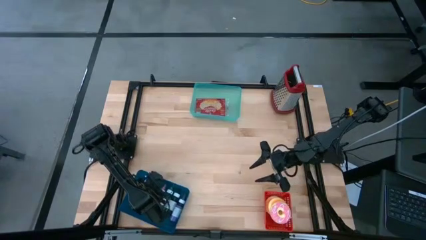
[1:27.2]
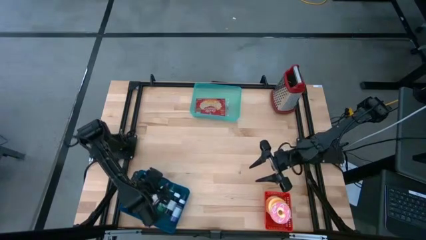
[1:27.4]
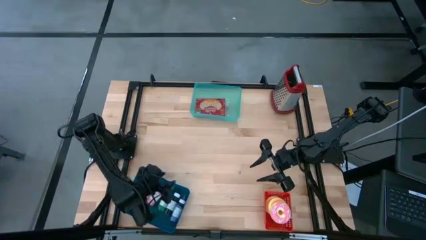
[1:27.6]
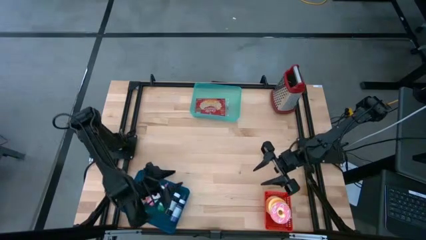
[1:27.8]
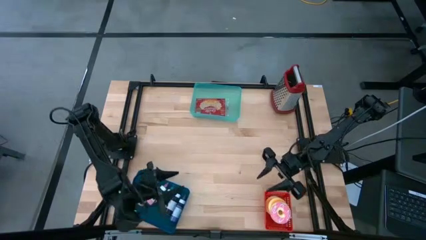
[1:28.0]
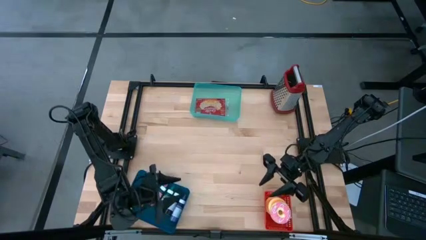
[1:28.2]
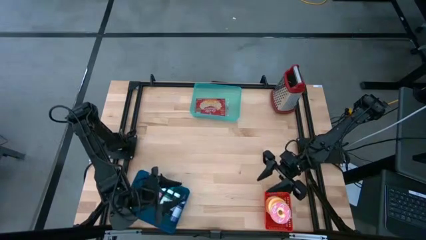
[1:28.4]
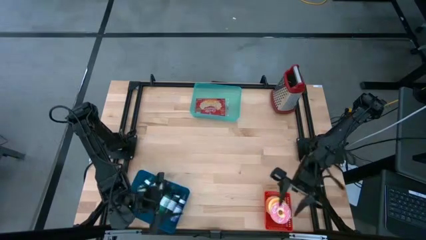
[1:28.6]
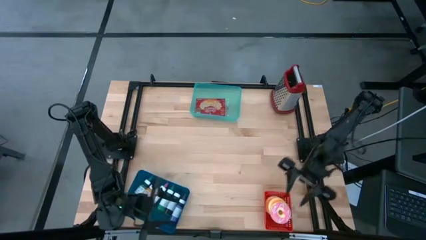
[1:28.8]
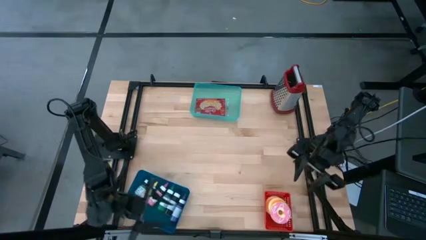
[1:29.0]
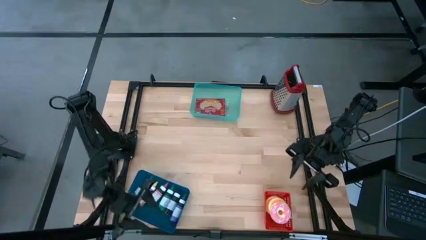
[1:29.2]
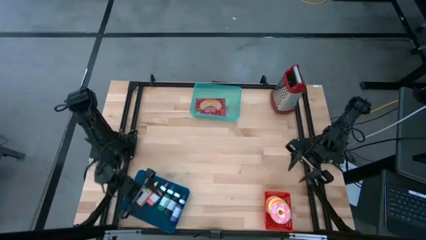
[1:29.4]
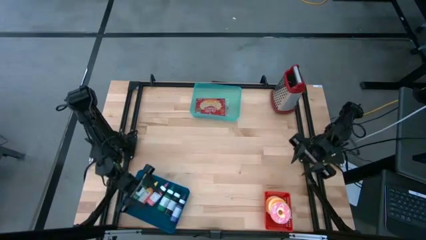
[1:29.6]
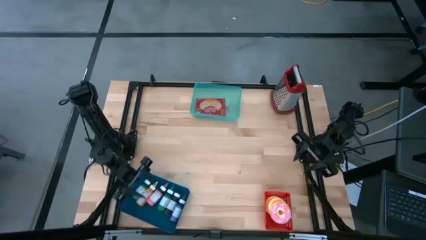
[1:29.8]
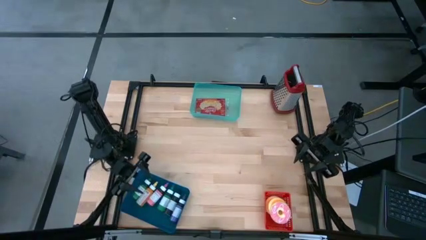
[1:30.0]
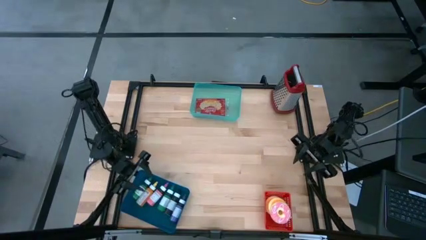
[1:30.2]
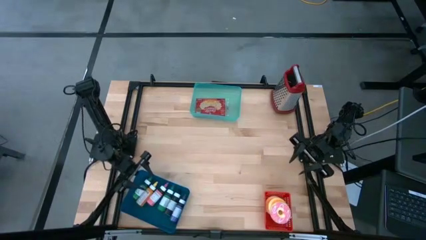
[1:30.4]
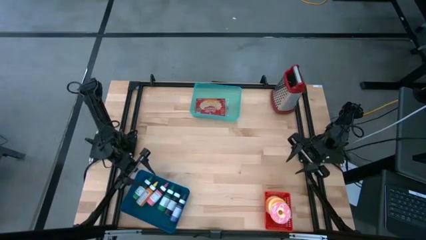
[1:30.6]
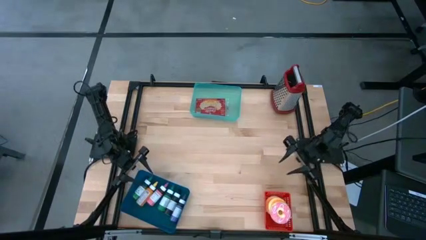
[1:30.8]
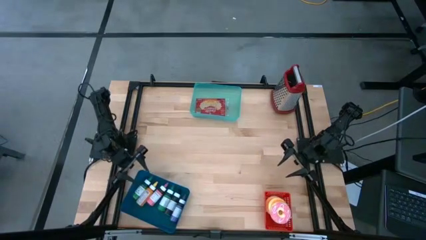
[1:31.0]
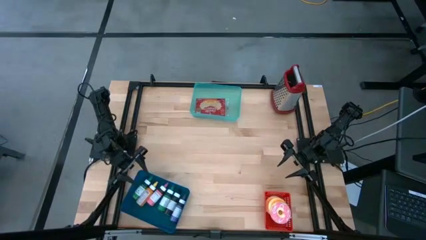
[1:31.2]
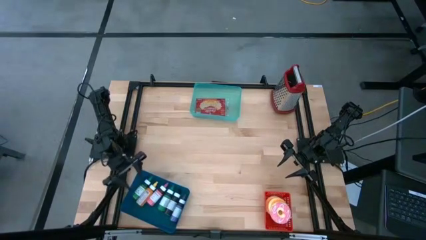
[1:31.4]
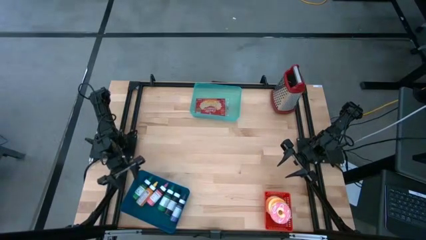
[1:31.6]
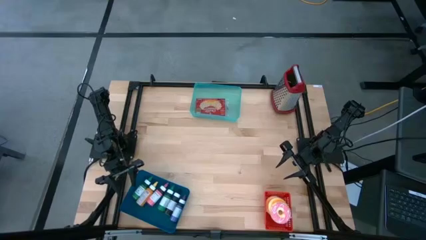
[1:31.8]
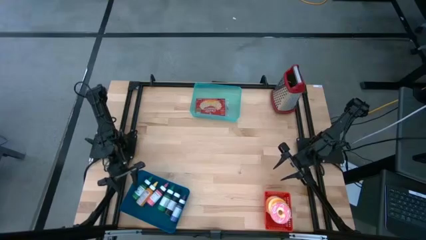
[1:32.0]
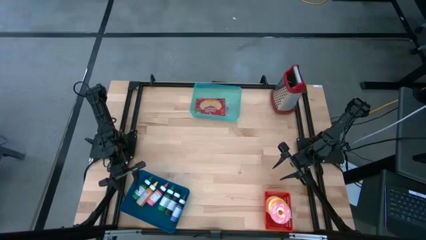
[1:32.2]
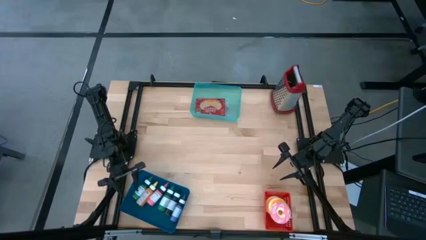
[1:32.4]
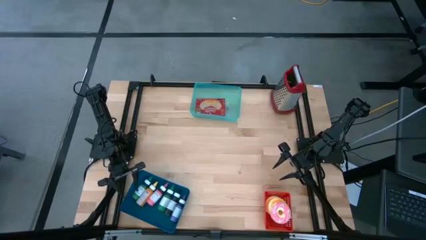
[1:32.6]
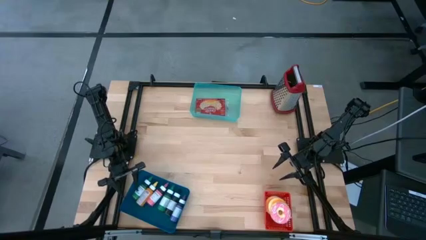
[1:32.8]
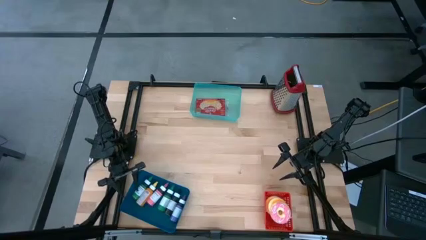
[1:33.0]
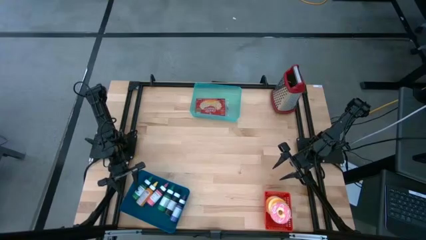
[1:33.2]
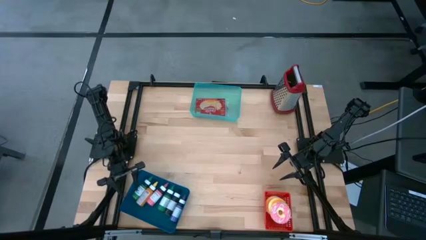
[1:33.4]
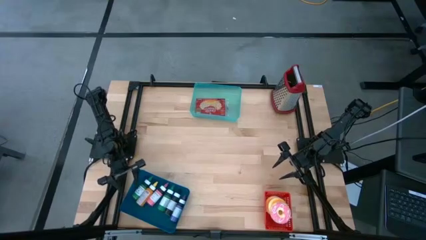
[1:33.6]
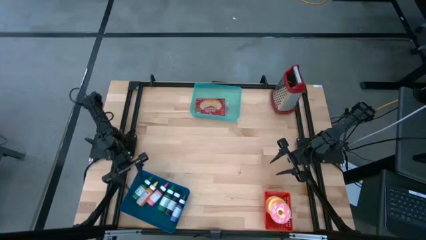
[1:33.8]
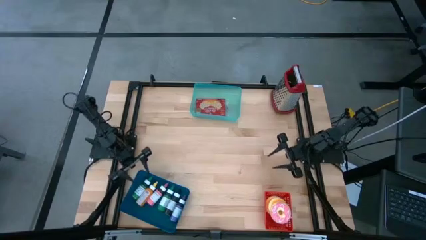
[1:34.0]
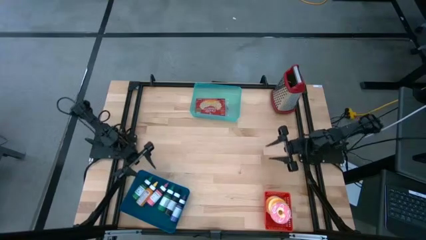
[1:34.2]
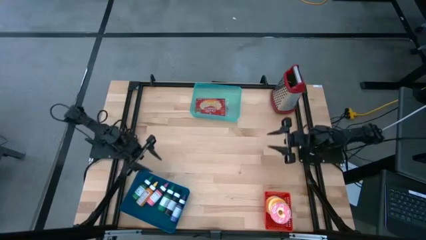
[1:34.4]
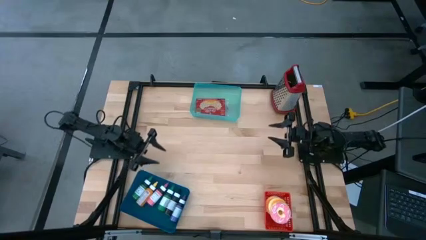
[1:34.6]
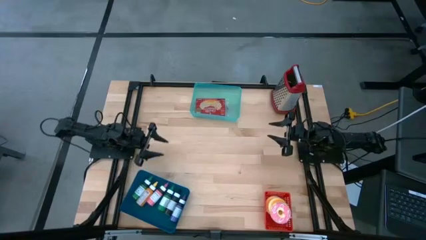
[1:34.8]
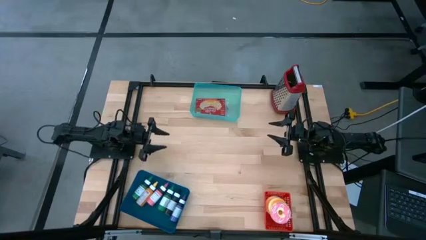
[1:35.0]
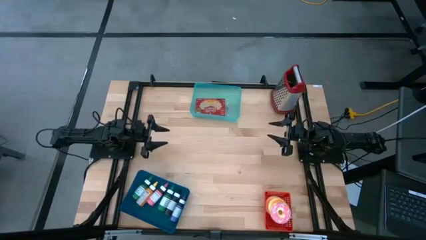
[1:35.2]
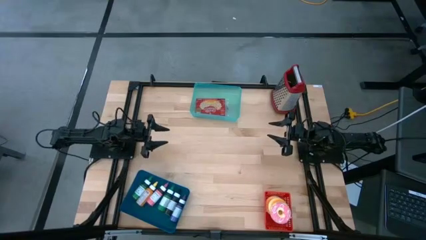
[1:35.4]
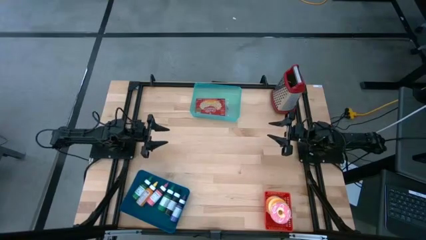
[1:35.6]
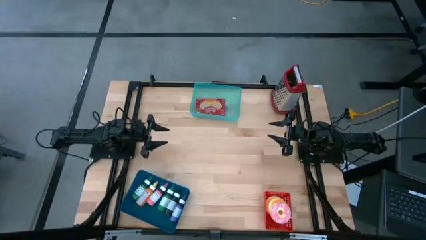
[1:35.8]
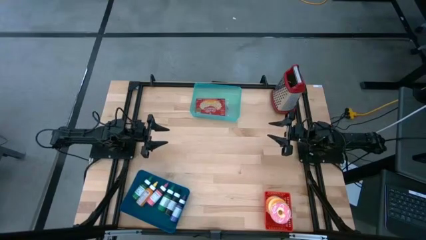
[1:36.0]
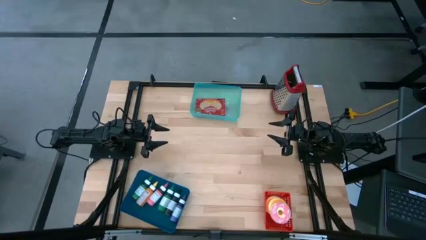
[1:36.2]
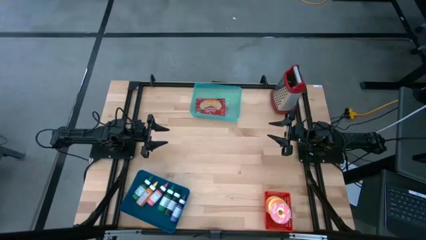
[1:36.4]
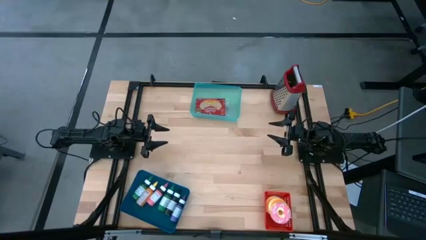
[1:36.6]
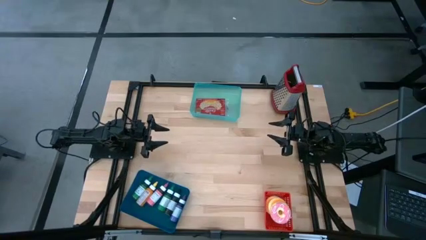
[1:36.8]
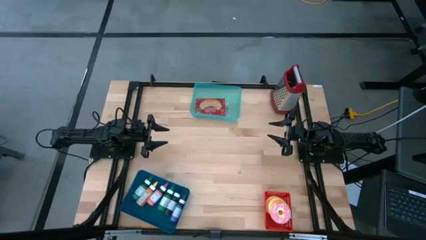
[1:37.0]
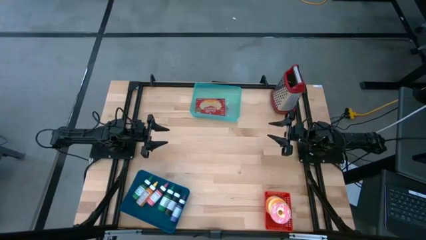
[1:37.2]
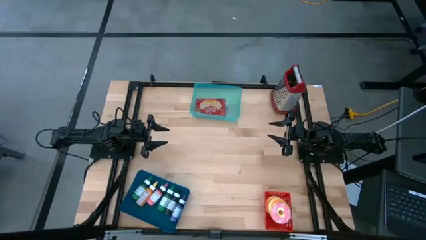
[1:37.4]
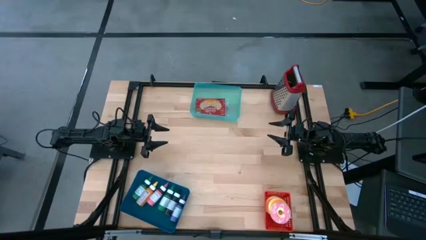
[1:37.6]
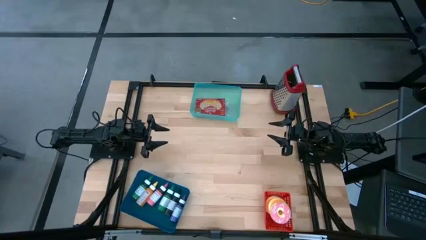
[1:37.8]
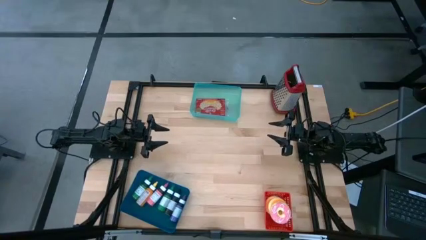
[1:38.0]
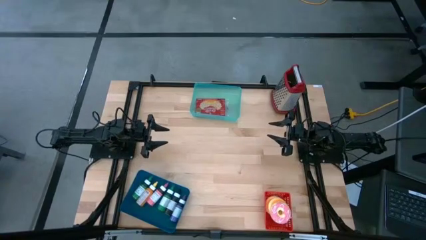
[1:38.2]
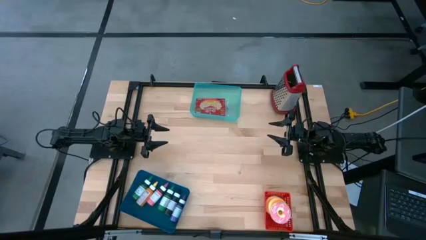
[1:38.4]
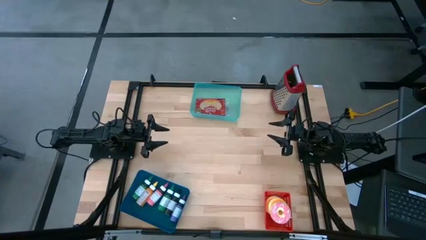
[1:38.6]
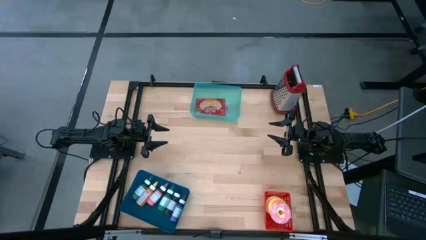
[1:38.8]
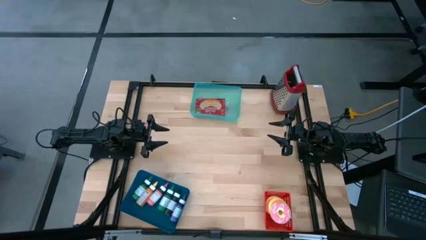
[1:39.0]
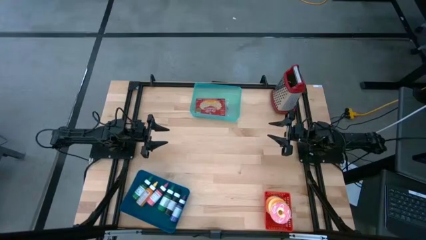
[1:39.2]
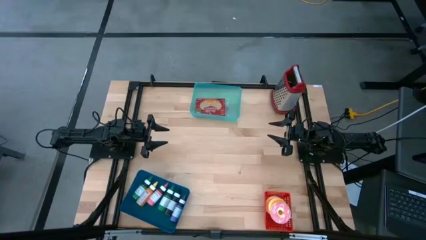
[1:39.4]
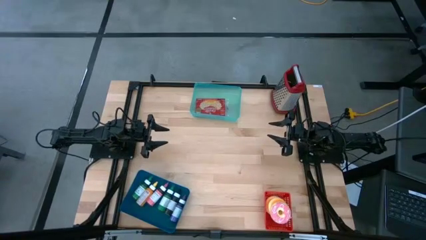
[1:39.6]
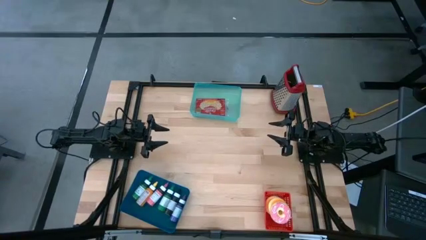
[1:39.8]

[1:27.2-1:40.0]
Return to Home Position

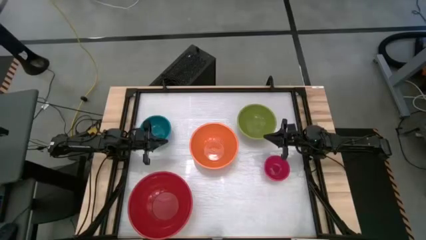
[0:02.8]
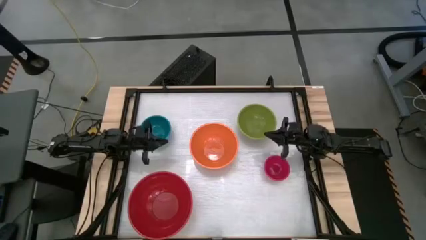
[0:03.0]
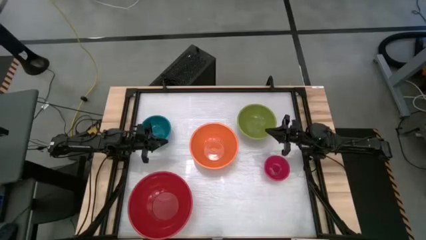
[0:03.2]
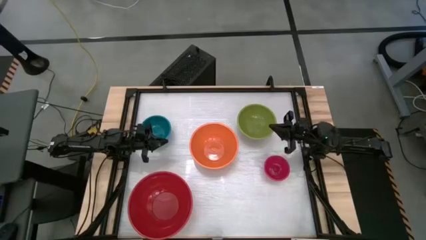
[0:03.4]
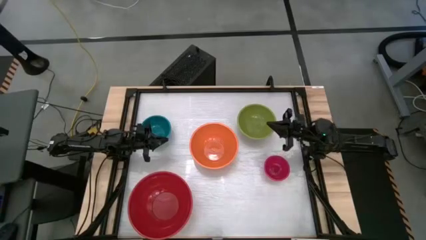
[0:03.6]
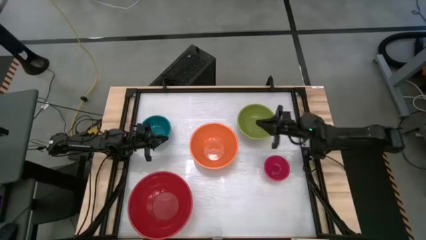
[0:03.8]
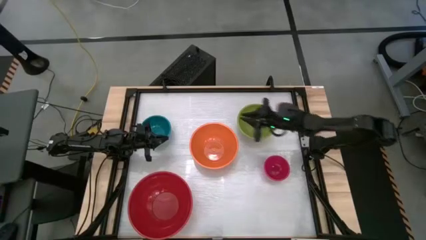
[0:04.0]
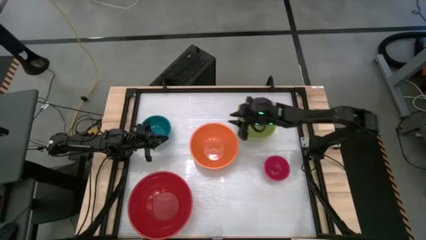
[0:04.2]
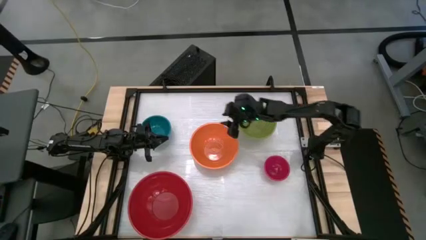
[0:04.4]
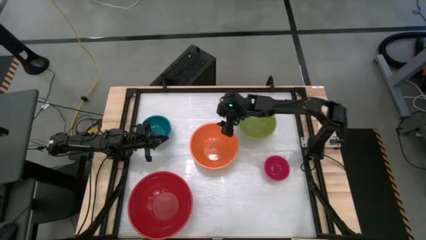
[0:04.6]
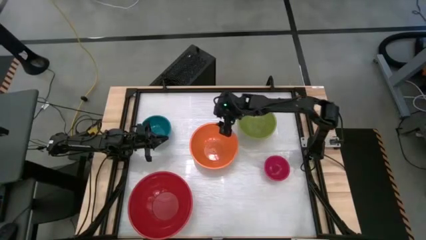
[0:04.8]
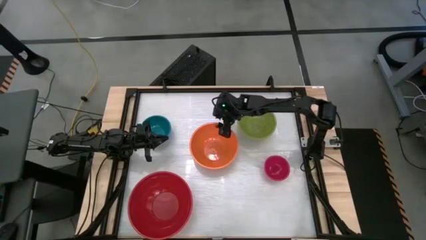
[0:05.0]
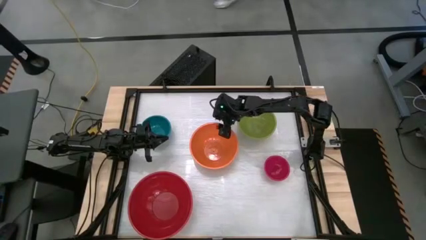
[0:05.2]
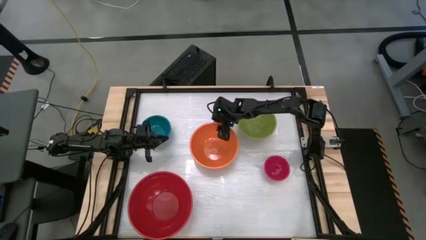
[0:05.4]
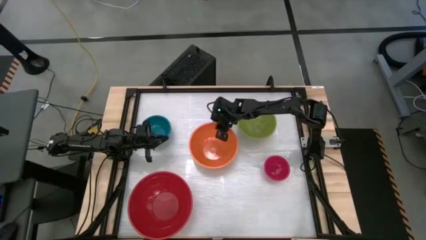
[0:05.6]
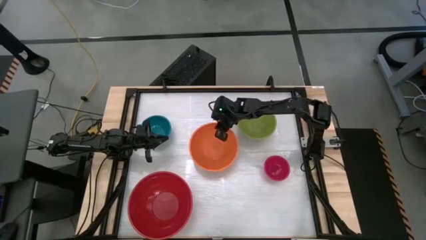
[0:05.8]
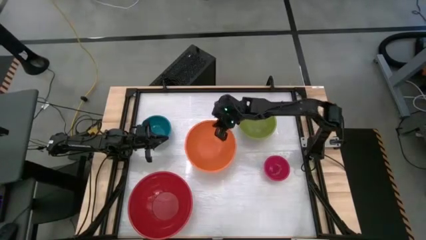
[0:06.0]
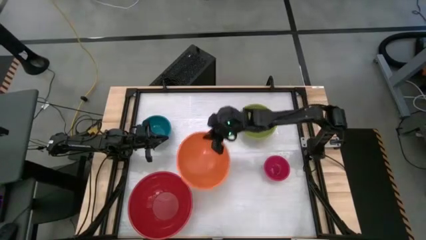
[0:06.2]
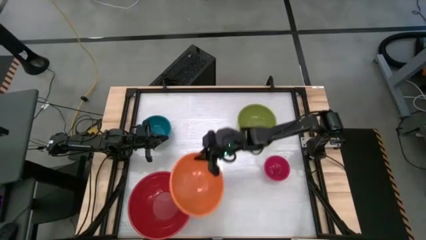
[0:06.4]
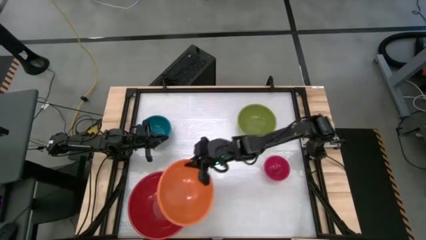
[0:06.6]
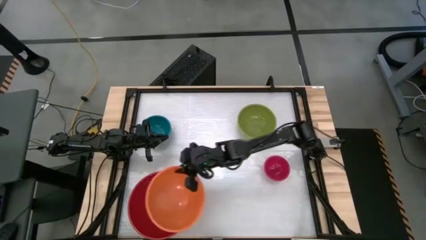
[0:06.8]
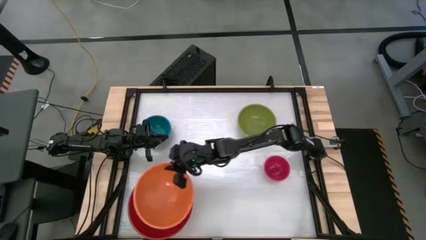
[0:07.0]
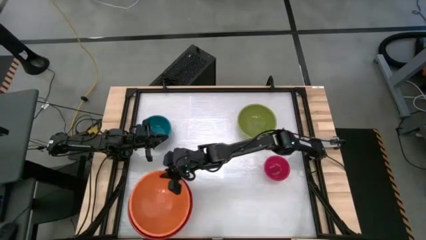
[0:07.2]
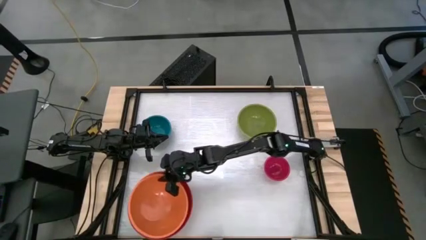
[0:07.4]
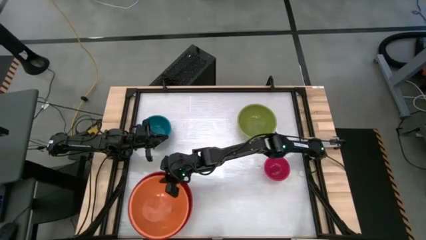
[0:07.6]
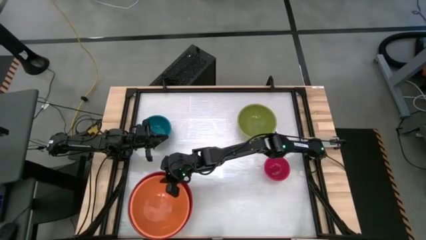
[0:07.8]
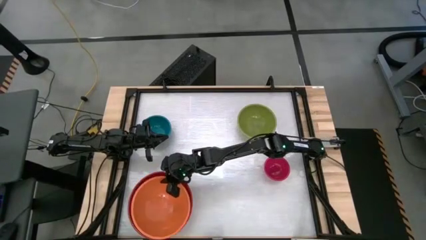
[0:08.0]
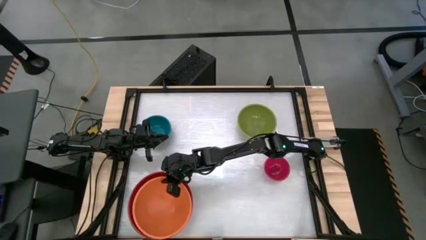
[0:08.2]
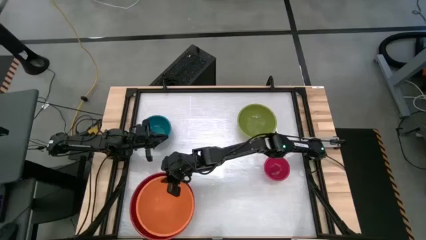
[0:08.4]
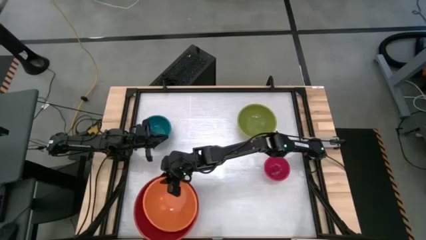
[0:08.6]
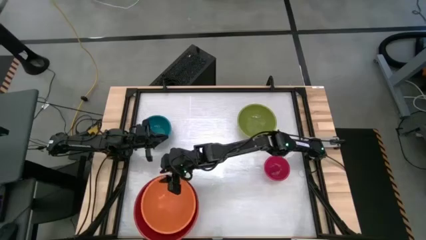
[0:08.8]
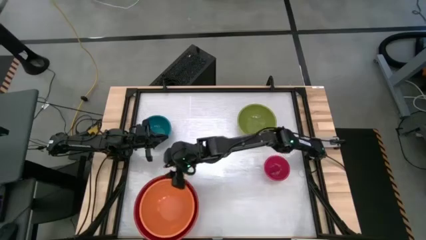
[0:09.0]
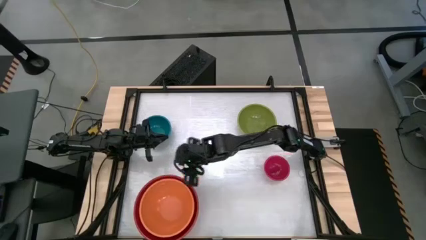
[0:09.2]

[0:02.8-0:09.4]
Stack the orange bowl on the red bowl
